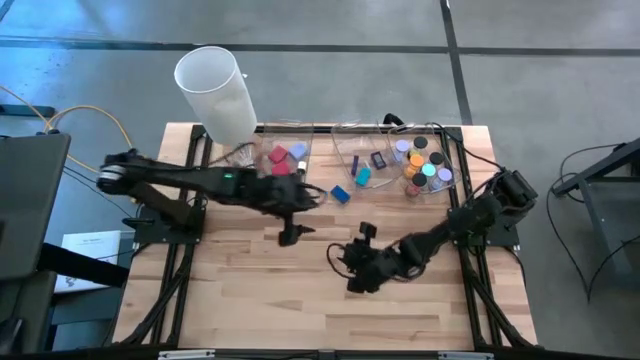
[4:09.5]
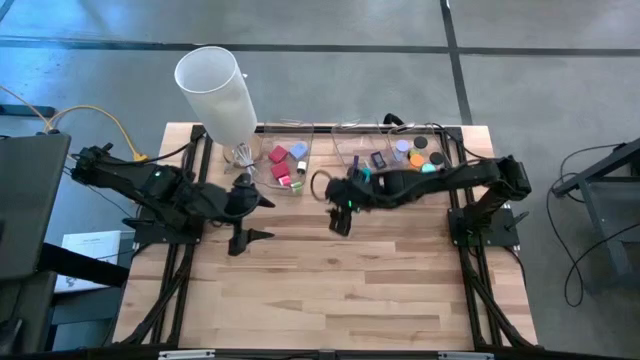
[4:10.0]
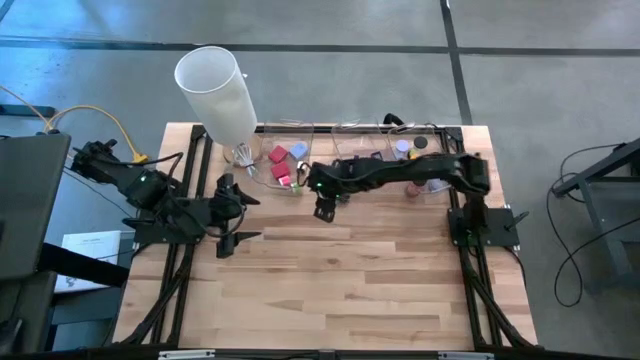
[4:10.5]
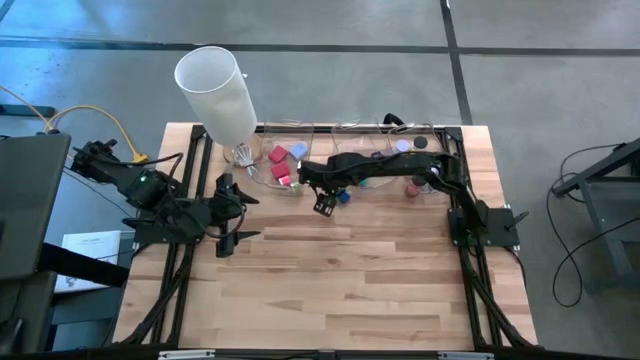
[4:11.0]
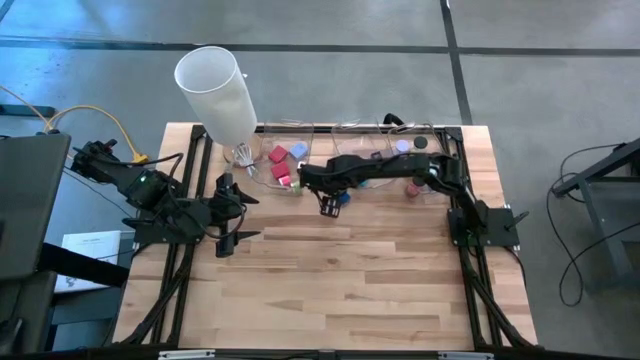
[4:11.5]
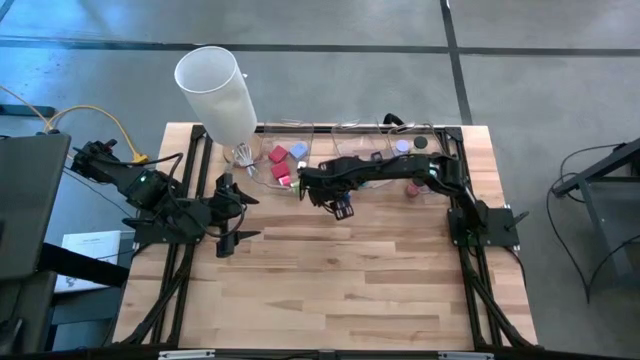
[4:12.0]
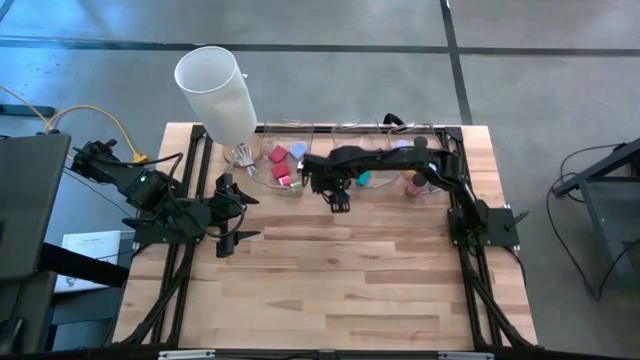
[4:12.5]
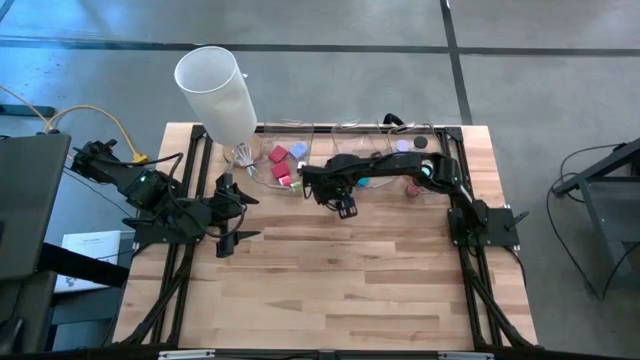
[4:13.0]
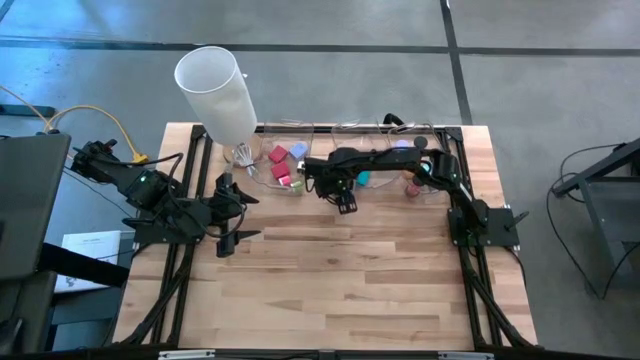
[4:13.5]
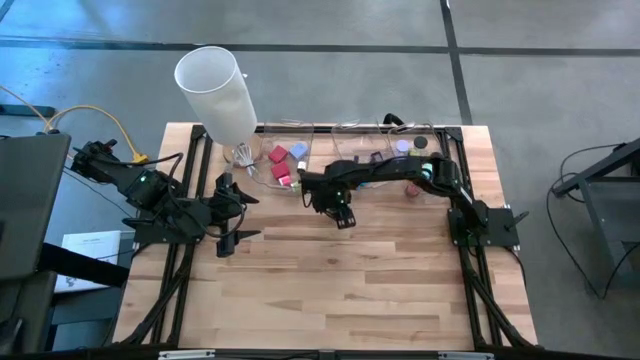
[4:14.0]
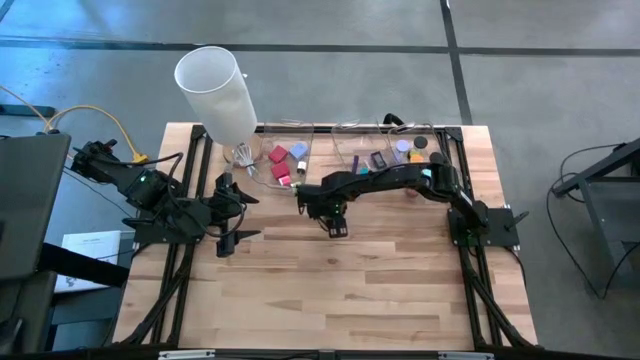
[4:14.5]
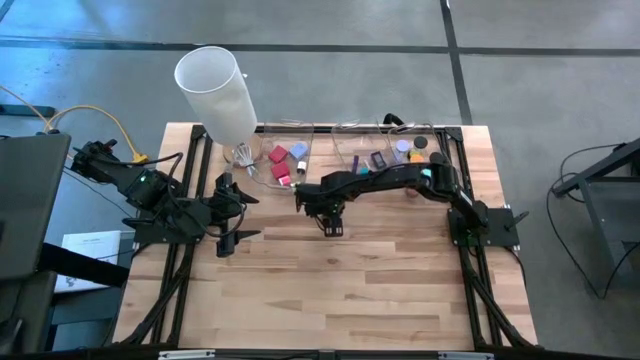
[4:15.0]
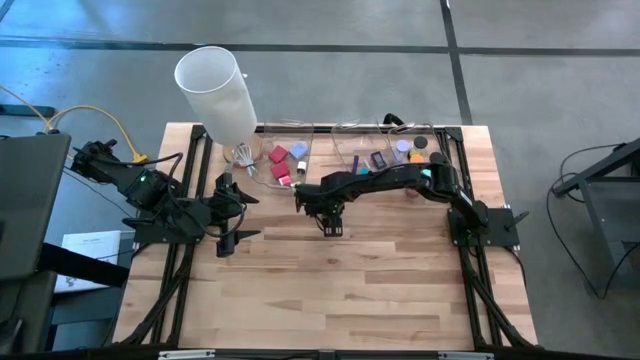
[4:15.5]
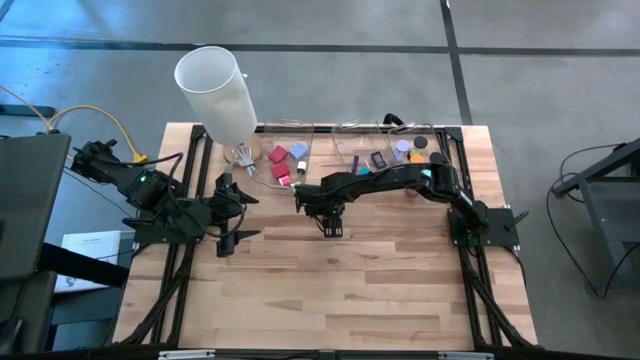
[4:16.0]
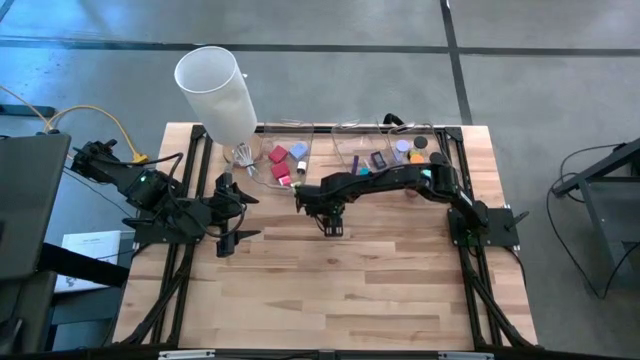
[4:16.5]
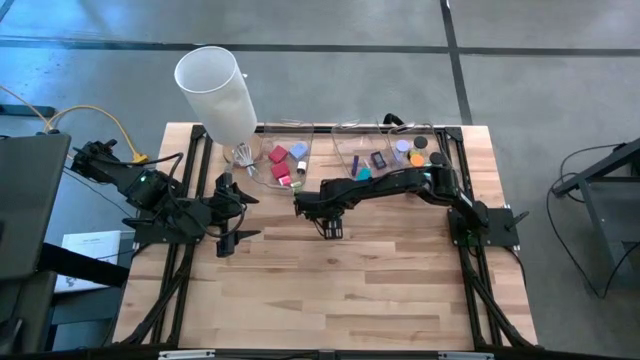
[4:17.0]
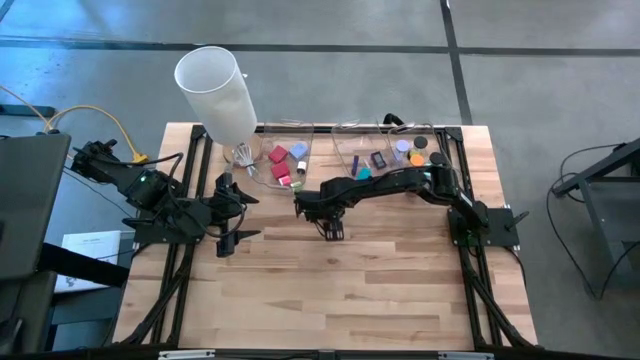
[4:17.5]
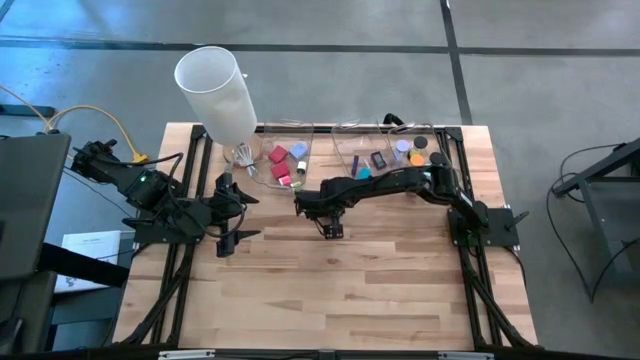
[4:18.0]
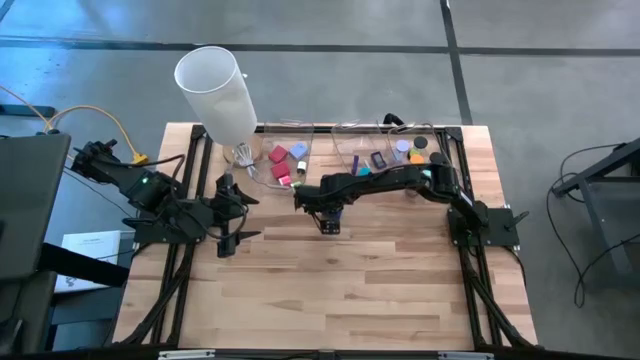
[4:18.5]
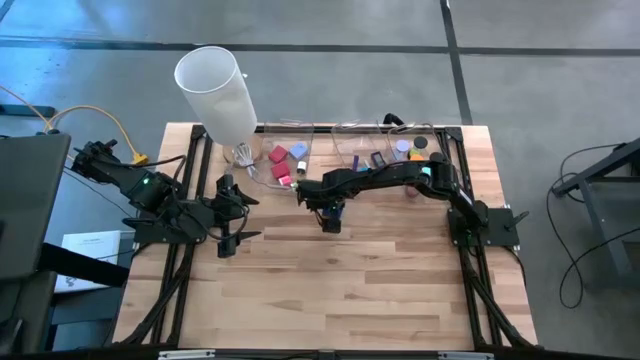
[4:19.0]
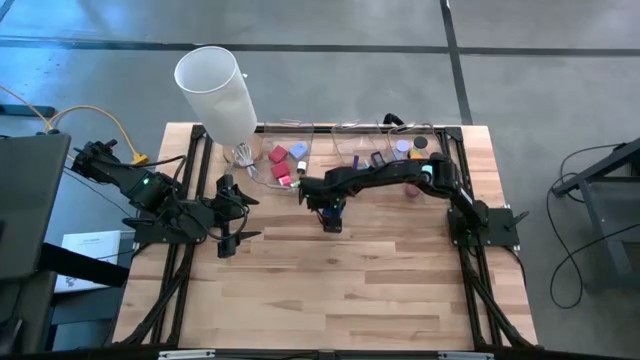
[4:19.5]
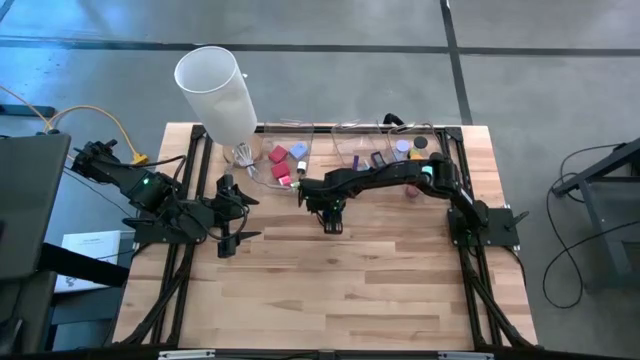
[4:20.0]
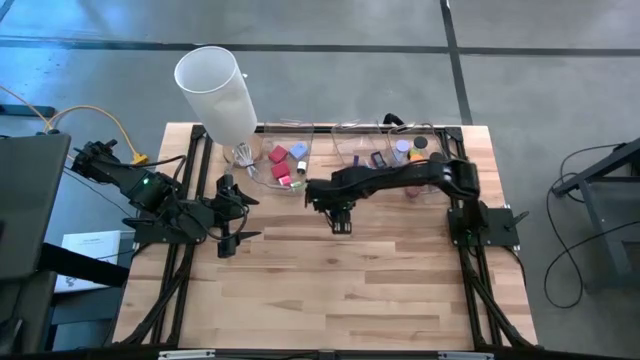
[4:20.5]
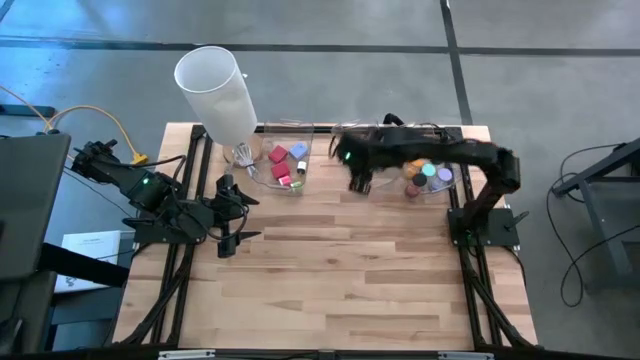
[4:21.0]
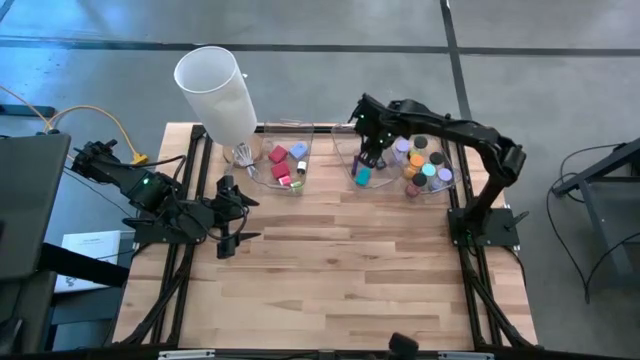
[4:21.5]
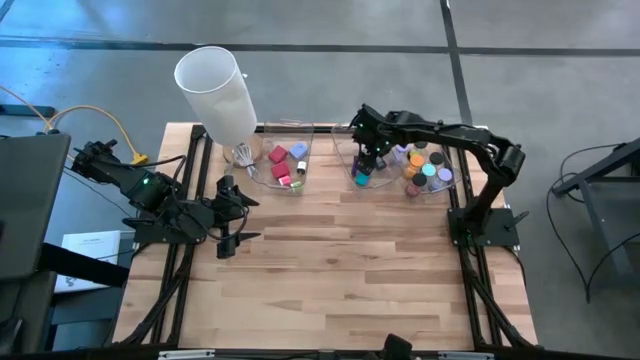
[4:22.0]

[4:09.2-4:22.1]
Task: Pick & Place Office items
Put the blue digital clock into the middle transparent bin

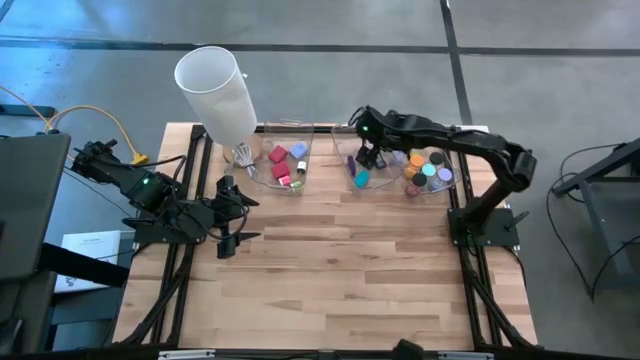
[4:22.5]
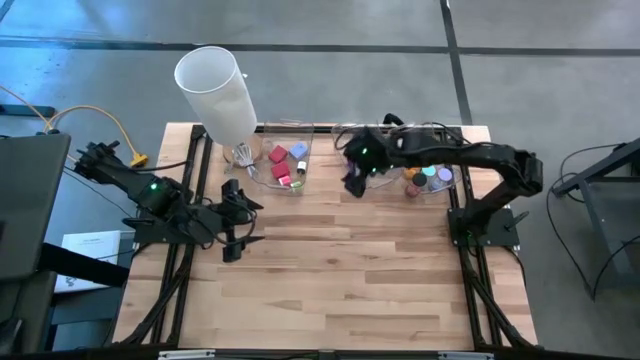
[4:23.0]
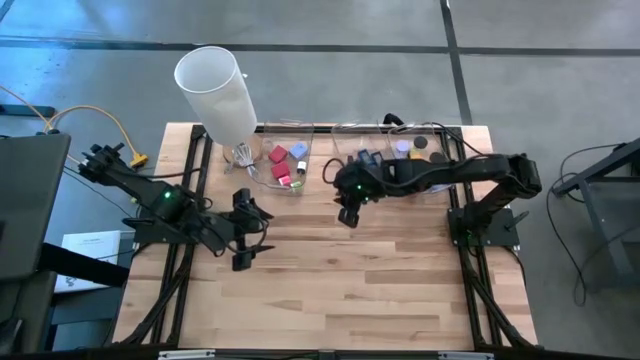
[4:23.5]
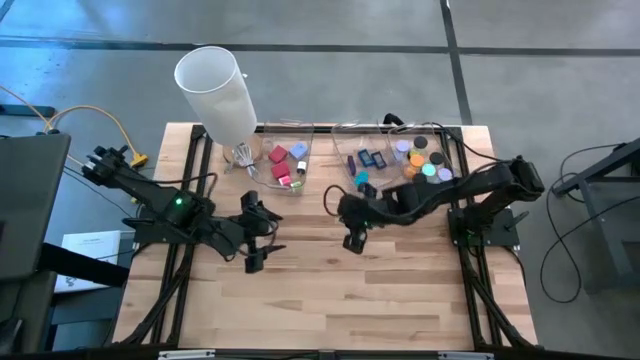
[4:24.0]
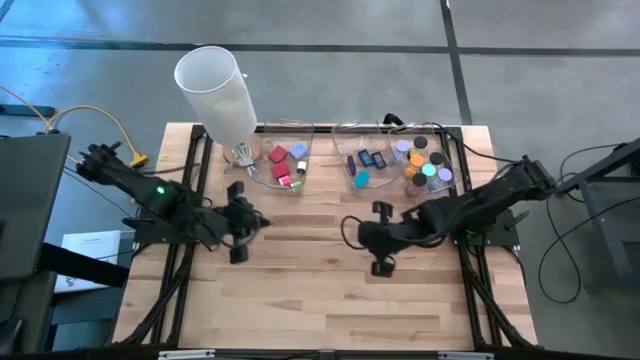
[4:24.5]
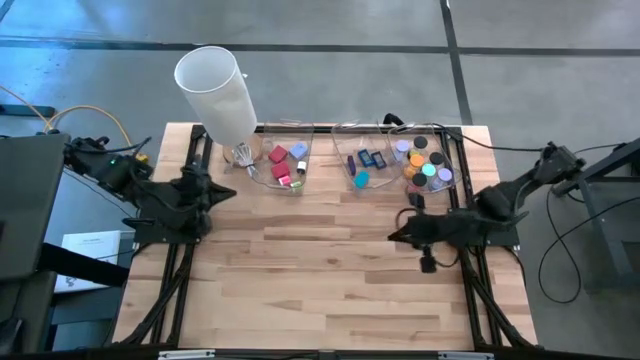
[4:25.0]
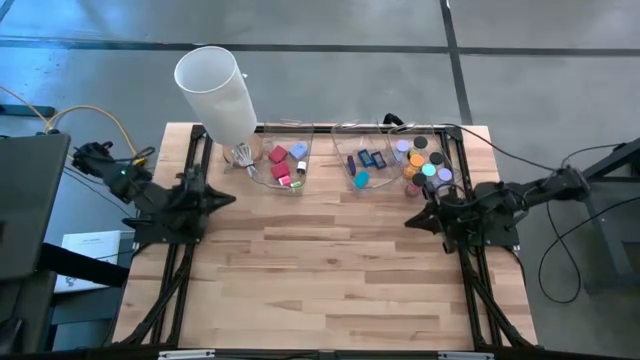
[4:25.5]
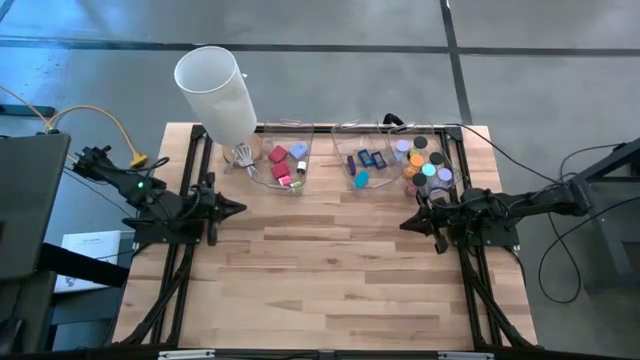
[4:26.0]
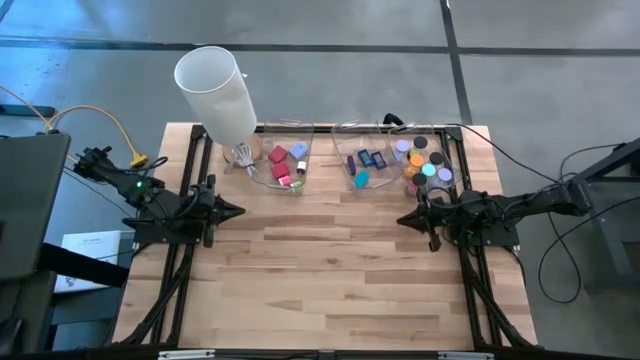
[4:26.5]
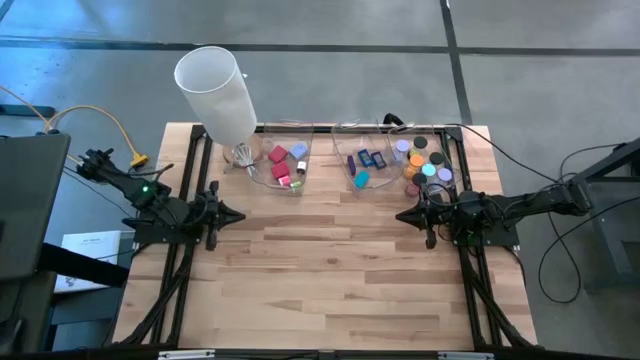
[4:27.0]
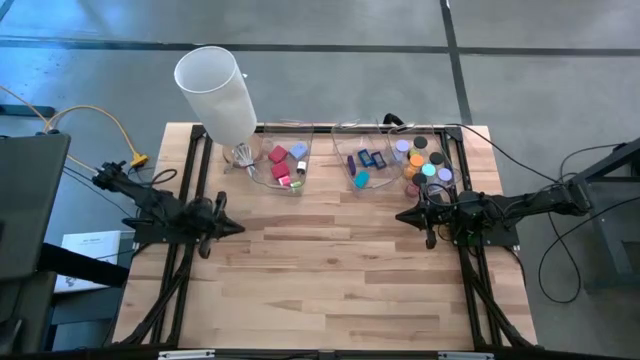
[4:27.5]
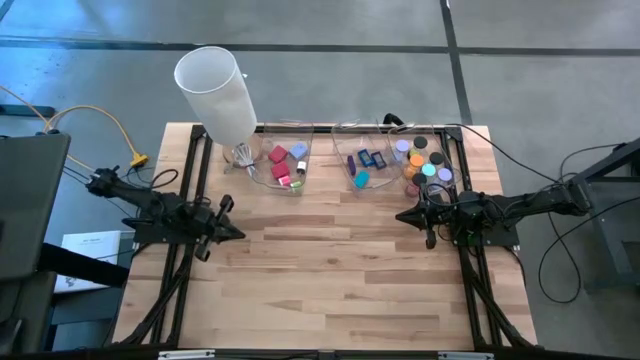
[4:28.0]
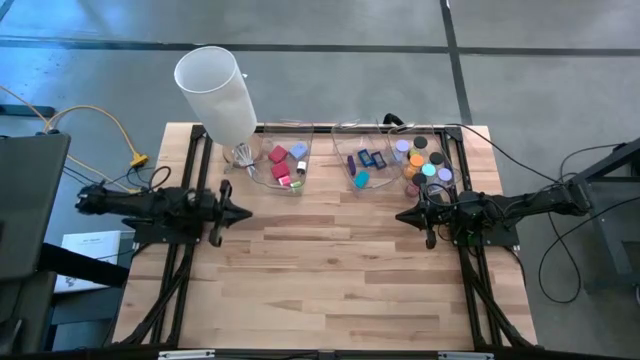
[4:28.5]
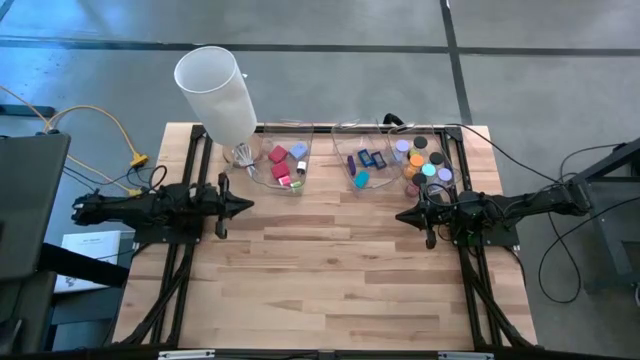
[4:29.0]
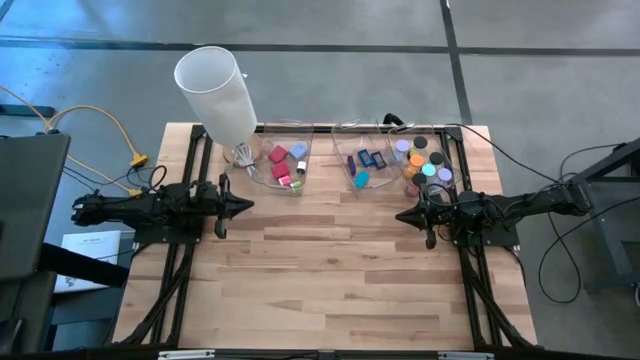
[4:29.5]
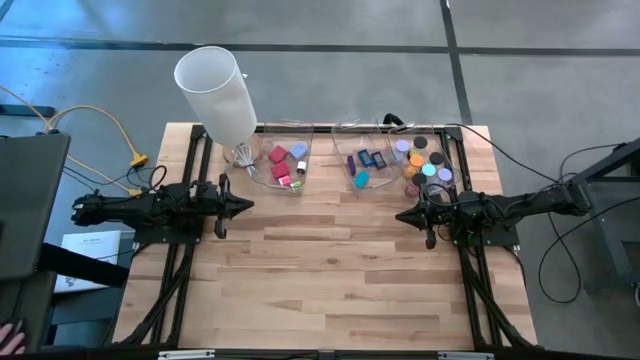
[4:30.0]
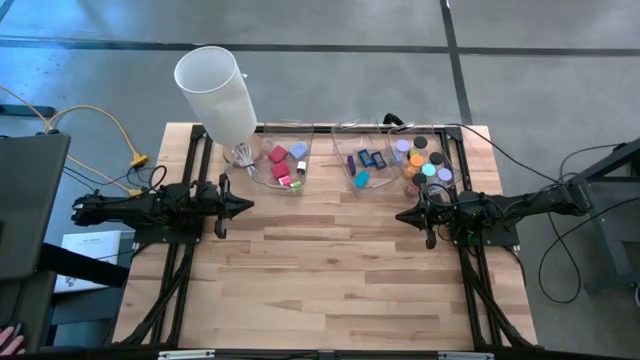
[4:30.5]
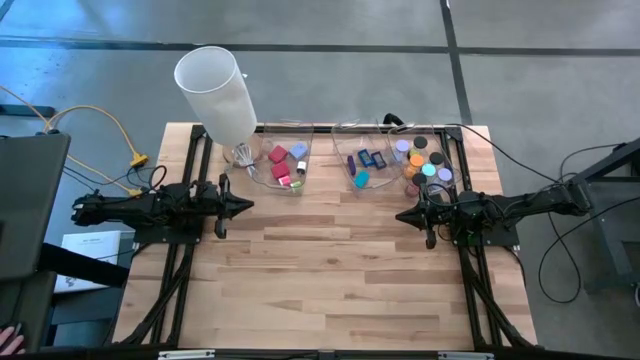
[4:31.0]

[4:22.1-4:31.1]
Return to Home Position
